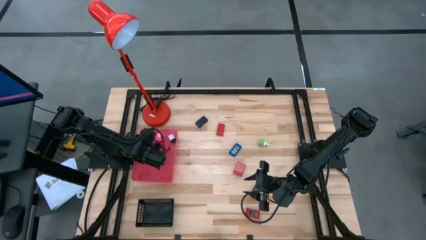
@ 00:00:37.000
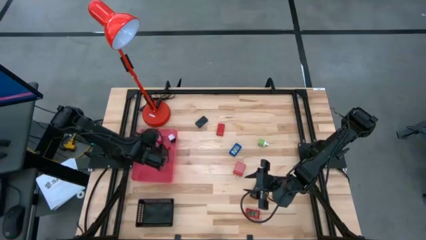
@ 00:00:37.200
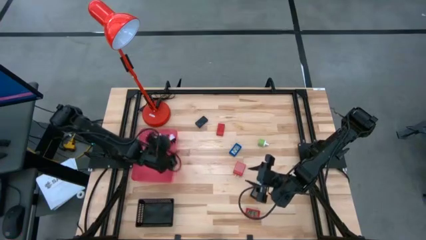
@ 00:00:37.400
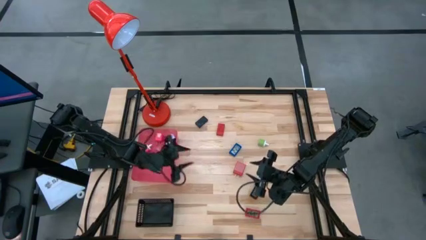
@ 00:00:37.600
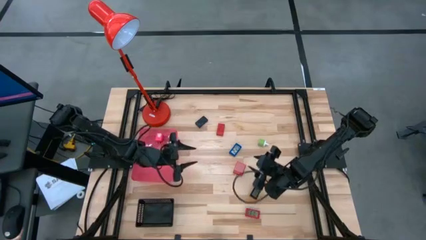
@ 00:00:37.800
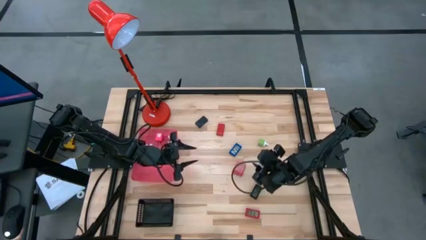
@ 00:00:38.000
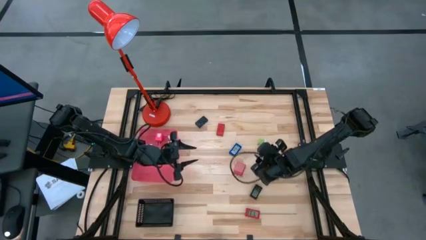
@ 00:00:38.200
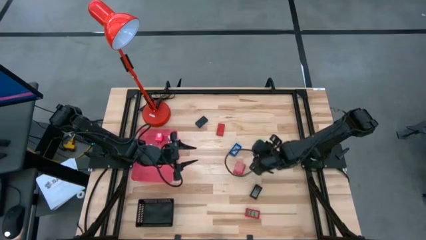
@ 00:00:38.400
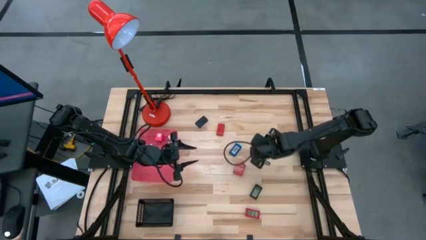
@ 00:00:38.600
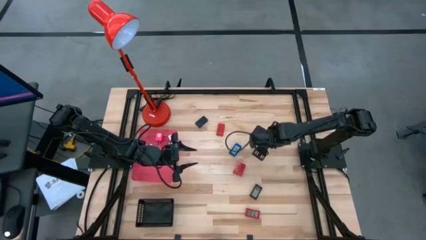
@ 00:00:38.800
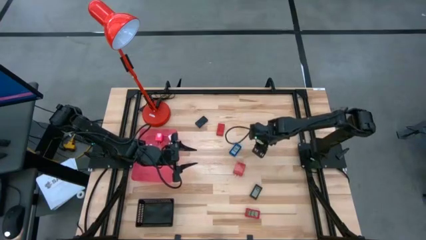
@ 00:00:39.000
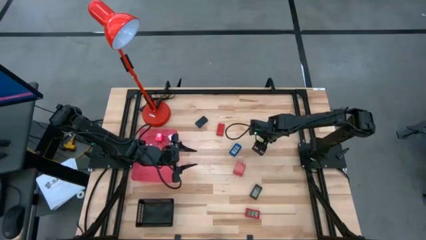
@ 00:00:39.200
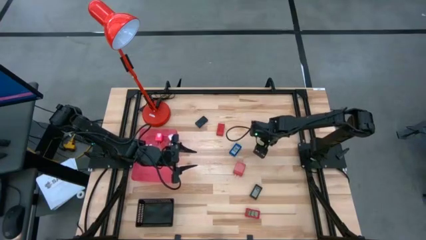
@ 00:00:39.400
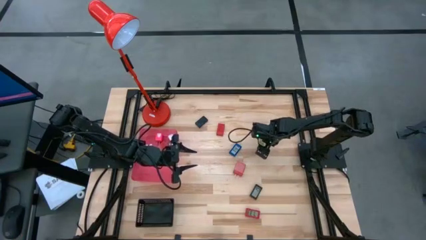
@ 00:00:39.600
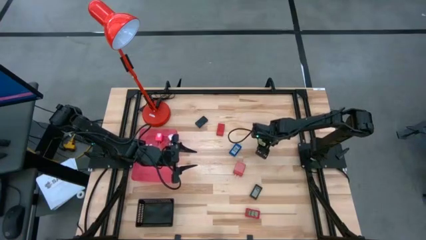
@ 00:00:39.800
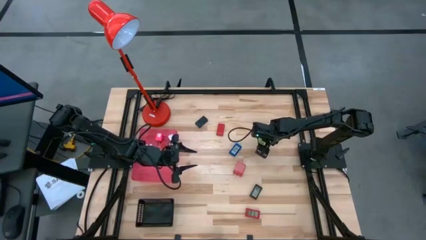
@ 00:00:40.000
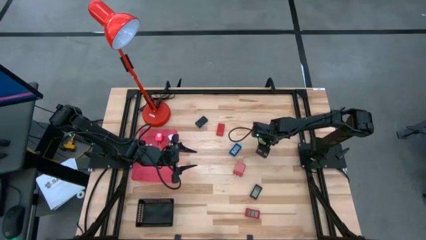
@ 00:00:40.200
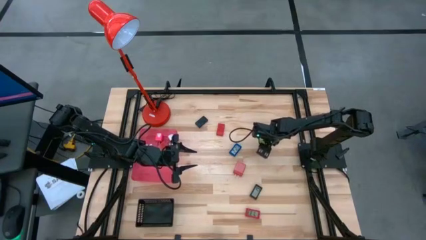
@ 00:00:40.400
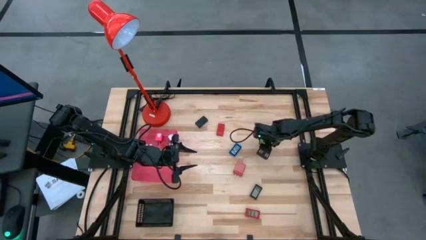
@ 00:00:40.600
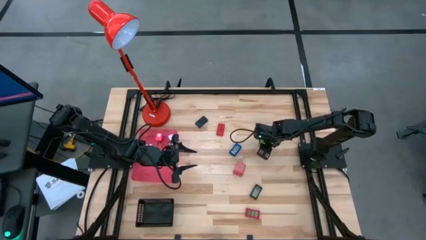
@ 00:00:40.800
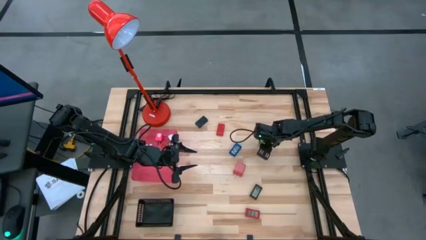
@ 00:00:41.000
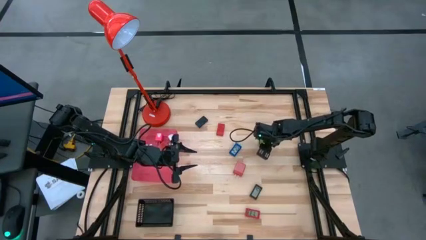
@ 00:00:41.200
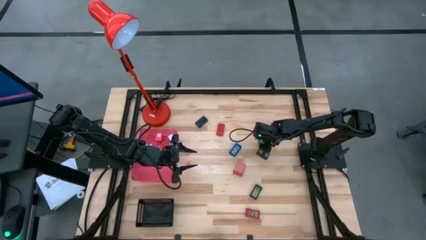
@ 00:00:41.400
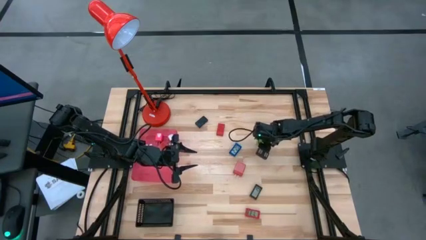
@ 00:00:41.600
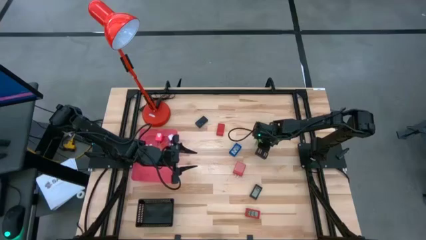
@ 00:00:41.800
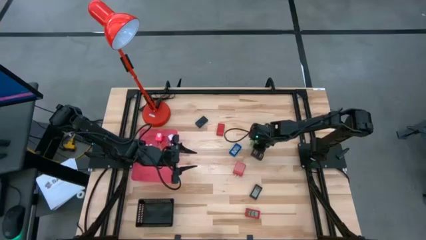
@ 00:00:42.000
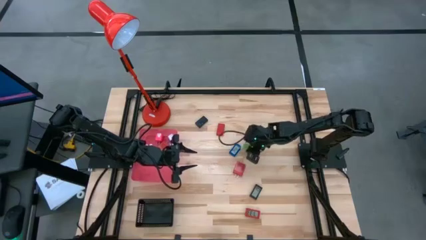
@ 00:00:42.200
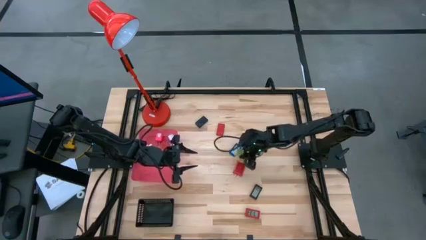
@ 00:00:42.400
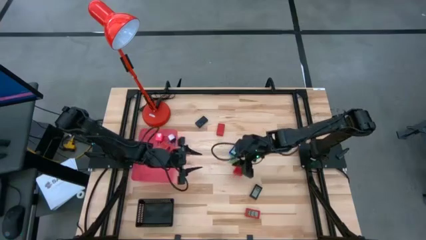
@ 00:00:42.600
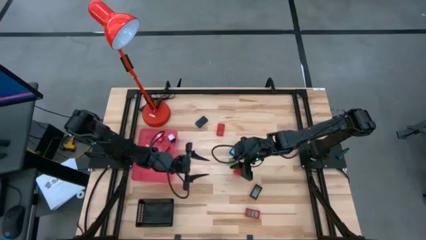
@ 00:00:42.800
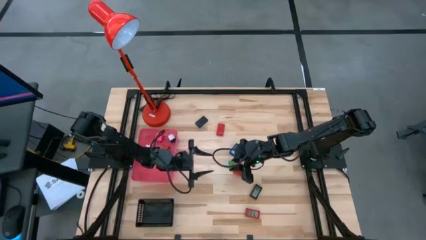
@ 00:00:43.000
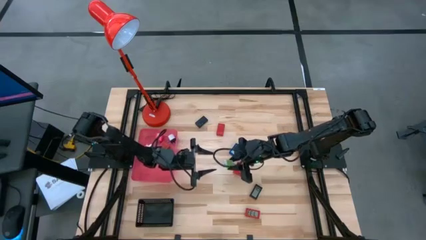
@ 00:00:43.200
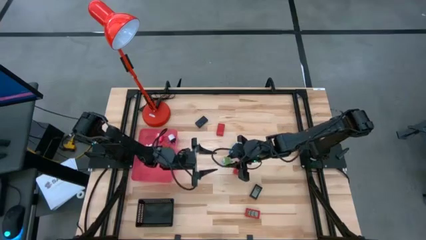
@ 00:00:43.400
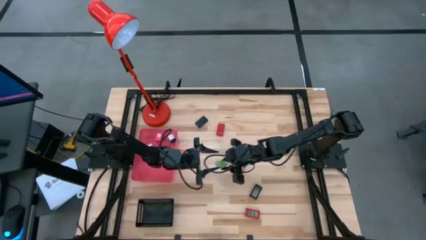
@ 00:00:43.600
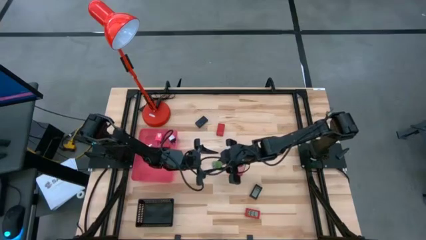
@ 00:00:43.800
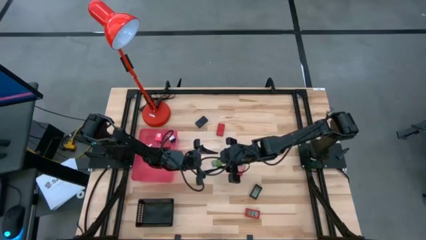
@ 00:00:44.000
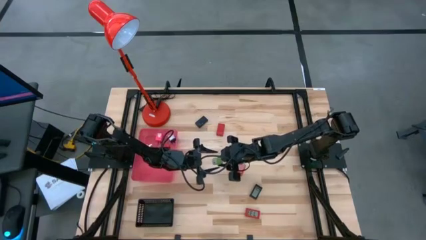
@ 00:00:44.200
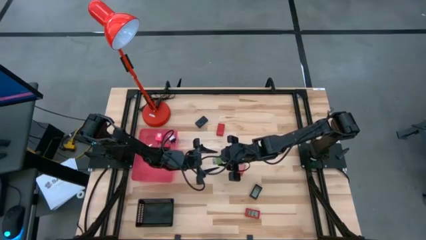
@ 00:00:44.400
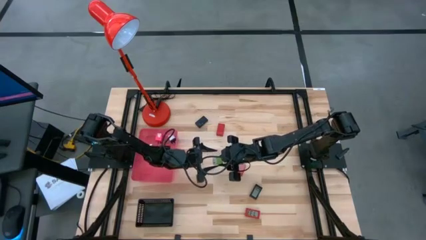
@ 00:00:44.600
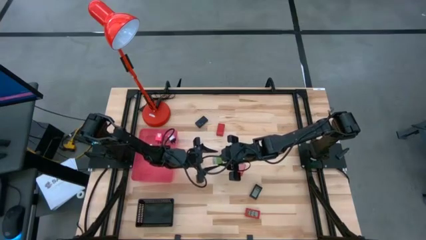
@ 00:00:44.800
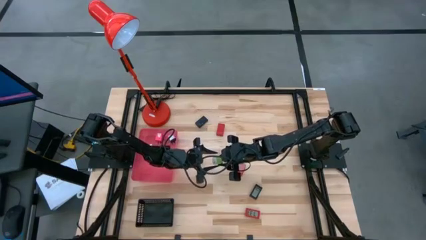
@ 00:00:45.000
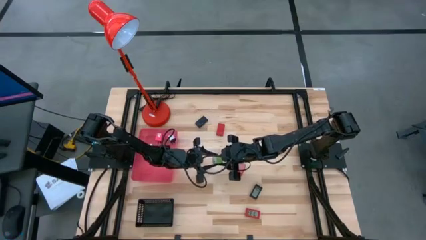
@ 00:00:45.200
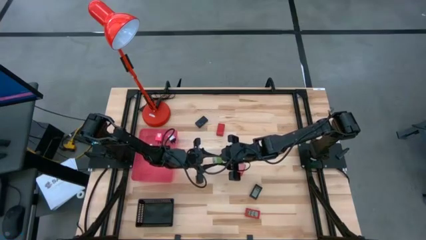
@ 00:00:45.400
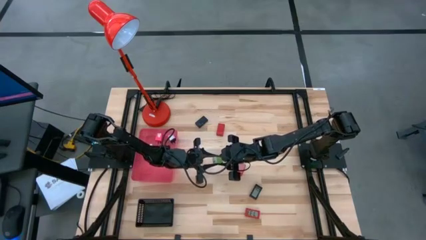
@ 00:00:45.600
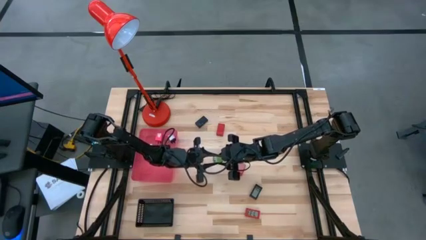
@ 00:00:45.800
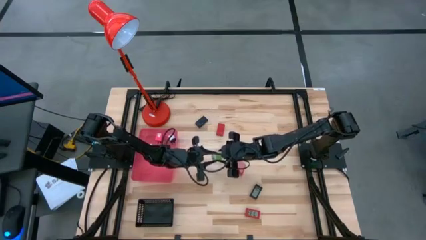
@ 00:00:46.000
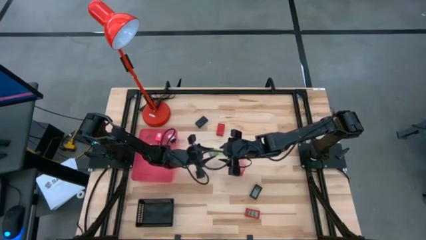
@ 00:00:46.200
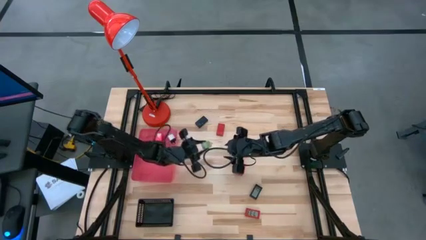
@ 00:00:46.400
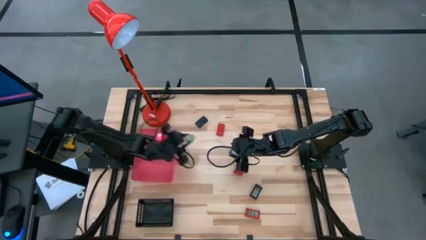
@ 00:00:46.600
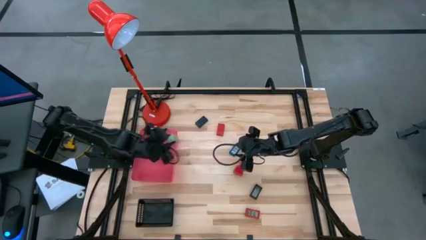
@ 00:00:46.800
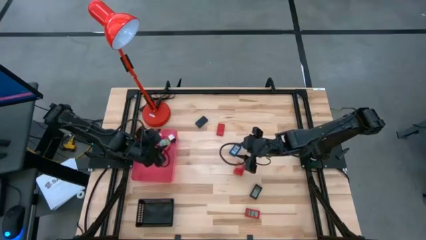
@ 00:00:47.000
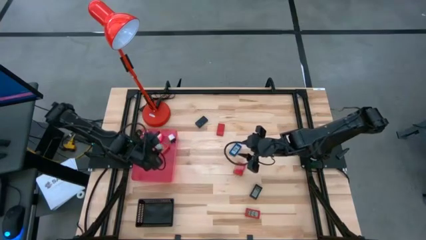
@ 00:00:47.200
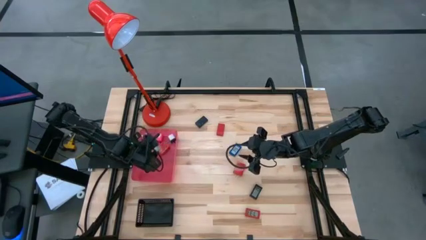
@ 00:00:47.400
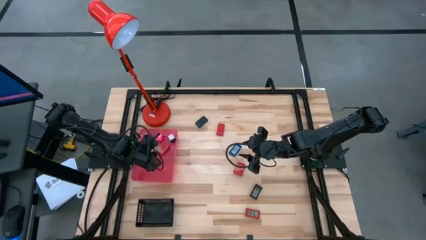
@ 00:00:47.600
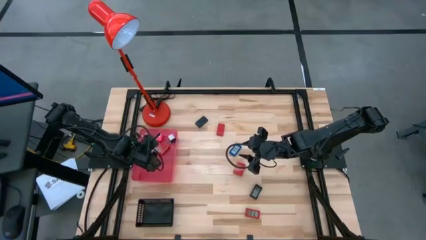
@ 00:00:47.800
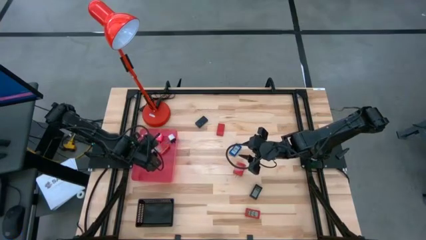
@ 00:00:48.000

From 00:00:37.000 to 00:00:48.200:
Task: Pick & Place Office items
Put the green charger adapter into the red bin
